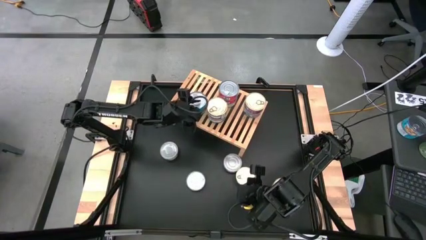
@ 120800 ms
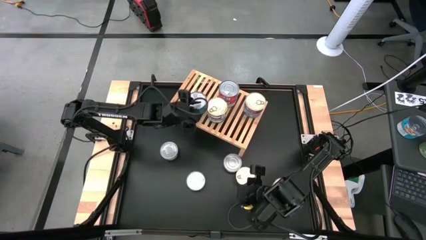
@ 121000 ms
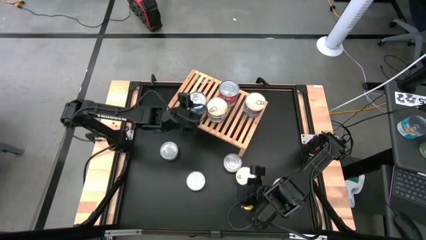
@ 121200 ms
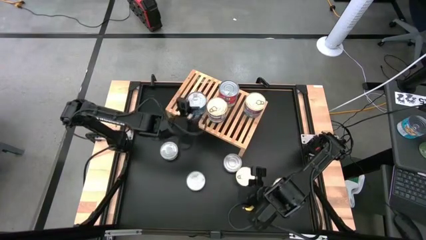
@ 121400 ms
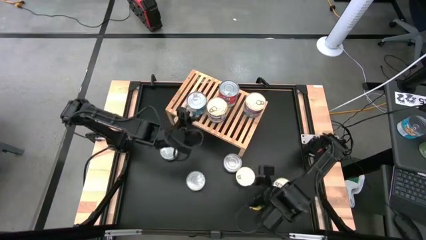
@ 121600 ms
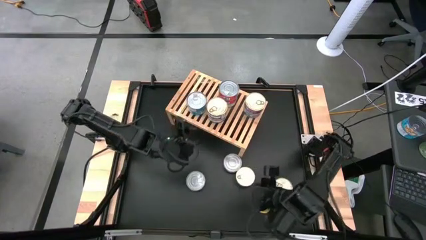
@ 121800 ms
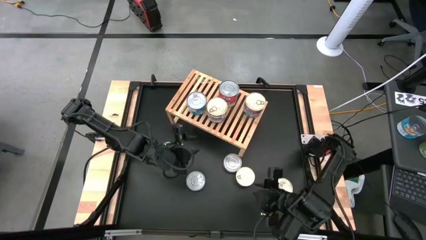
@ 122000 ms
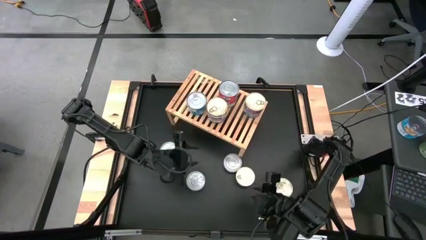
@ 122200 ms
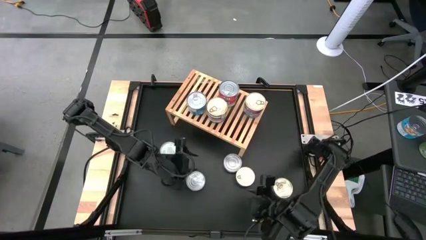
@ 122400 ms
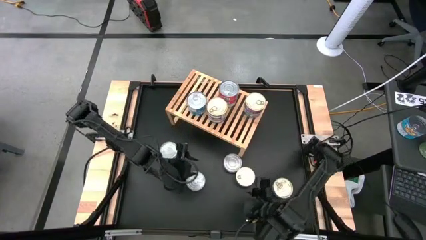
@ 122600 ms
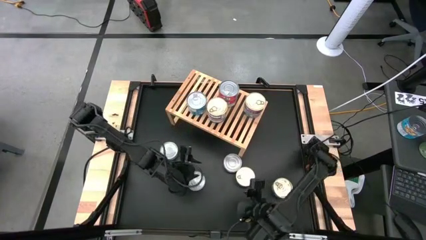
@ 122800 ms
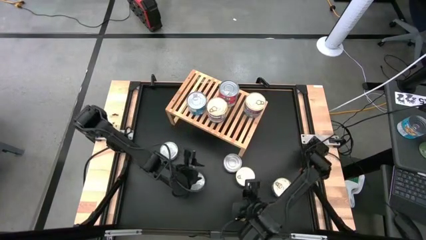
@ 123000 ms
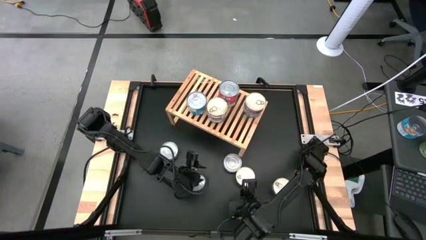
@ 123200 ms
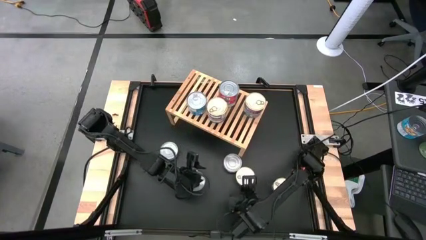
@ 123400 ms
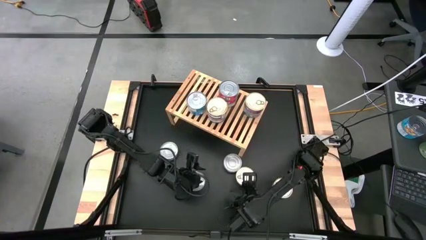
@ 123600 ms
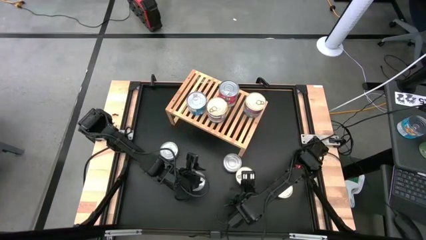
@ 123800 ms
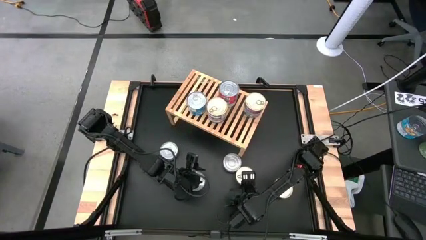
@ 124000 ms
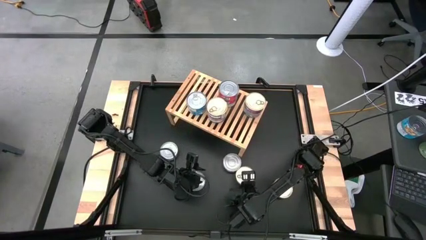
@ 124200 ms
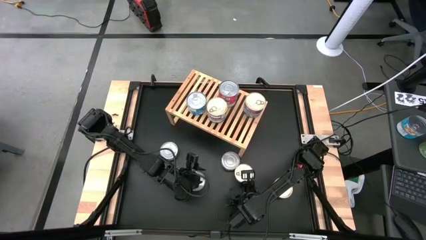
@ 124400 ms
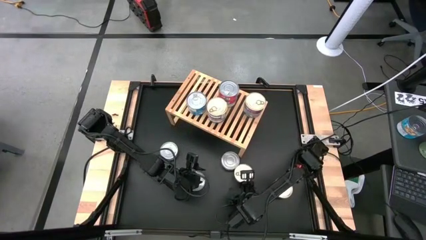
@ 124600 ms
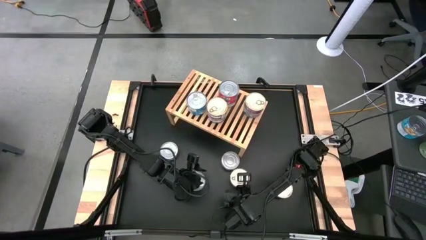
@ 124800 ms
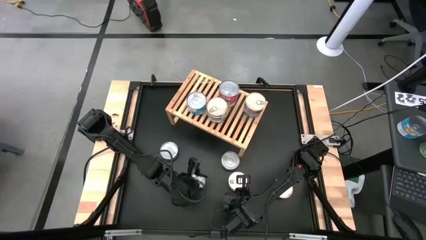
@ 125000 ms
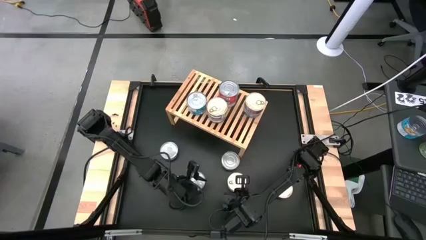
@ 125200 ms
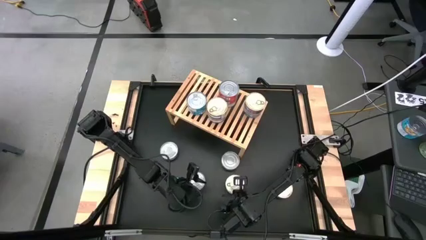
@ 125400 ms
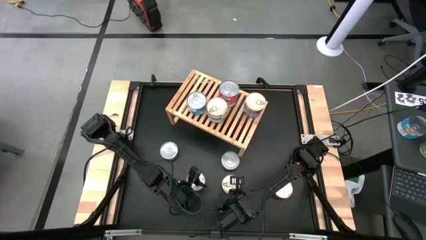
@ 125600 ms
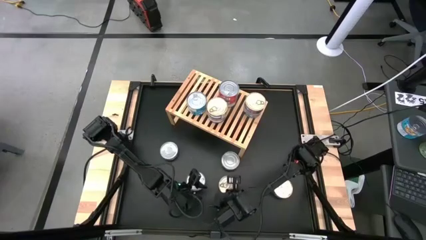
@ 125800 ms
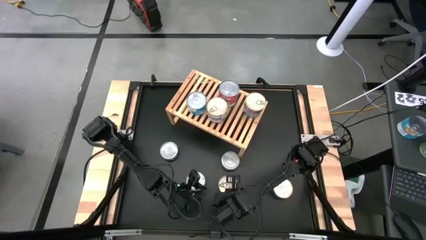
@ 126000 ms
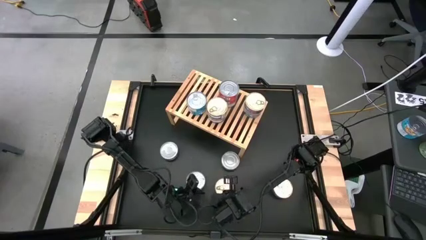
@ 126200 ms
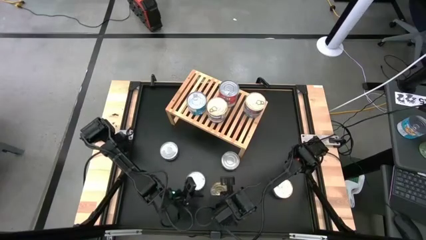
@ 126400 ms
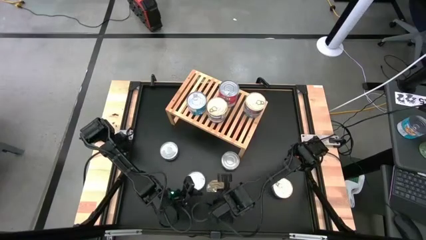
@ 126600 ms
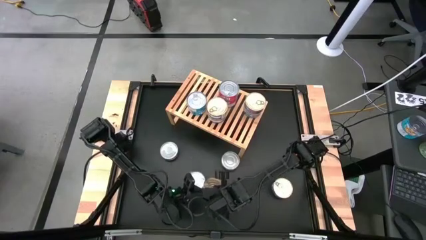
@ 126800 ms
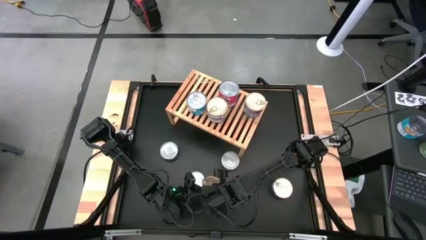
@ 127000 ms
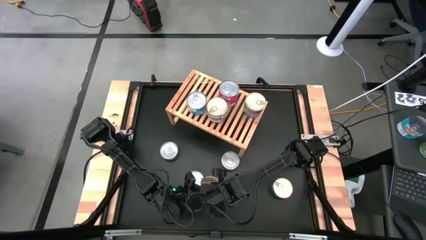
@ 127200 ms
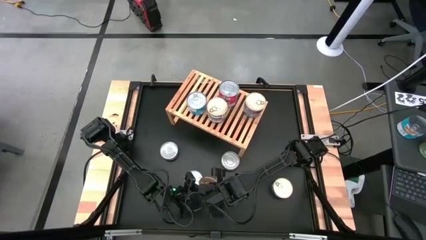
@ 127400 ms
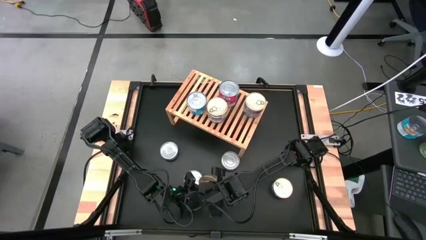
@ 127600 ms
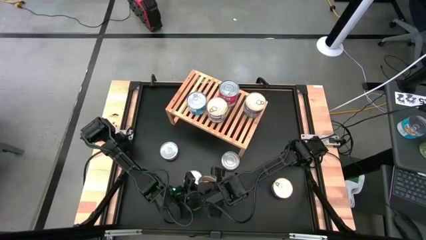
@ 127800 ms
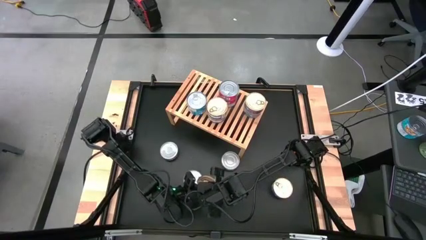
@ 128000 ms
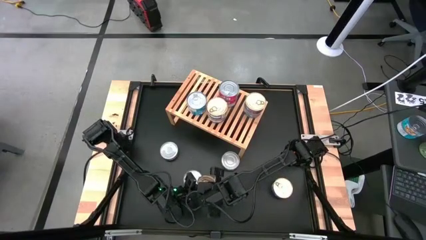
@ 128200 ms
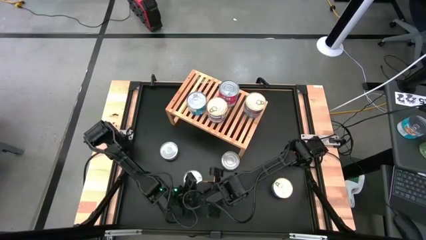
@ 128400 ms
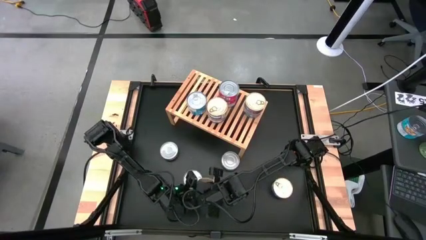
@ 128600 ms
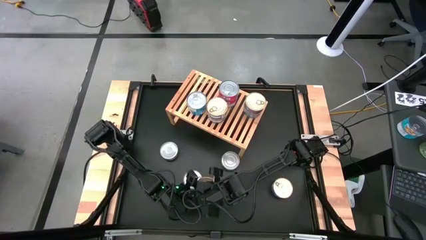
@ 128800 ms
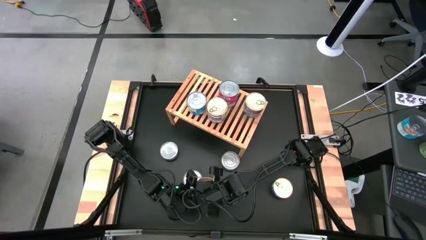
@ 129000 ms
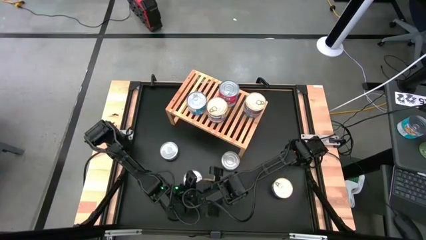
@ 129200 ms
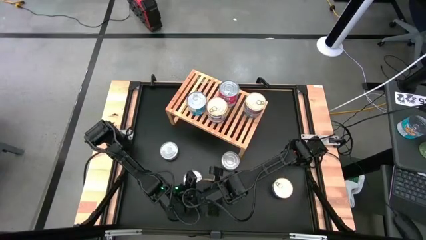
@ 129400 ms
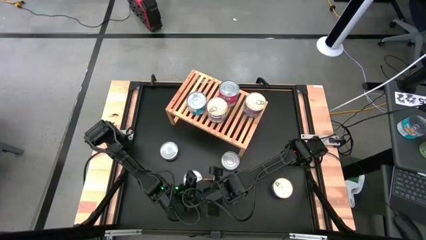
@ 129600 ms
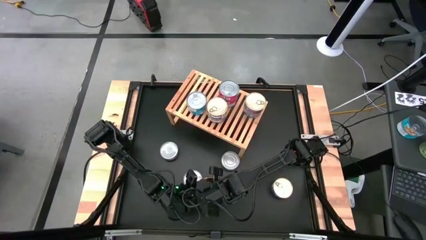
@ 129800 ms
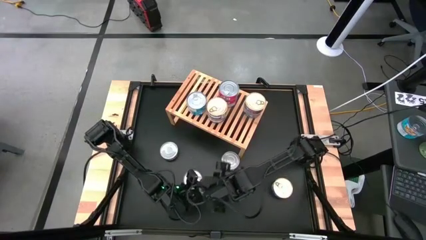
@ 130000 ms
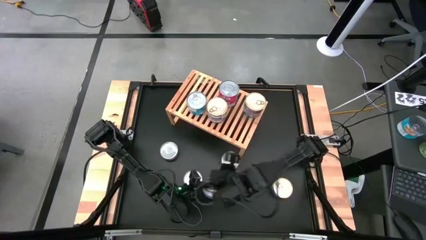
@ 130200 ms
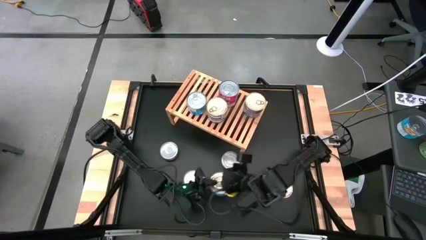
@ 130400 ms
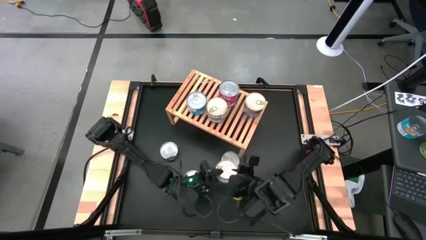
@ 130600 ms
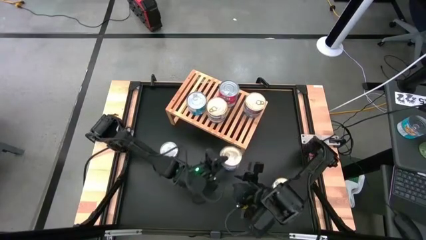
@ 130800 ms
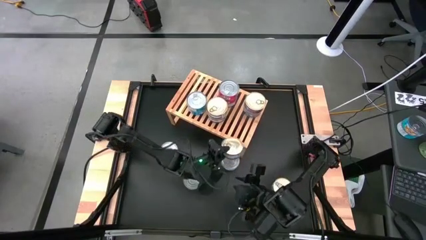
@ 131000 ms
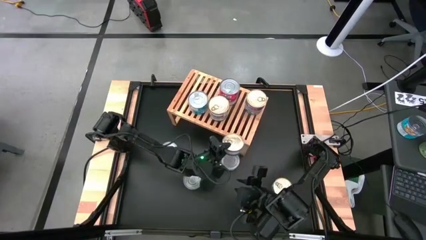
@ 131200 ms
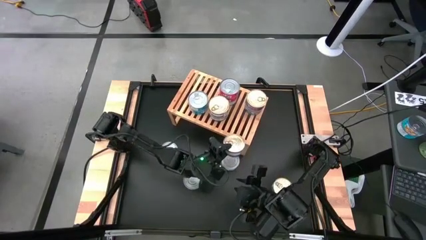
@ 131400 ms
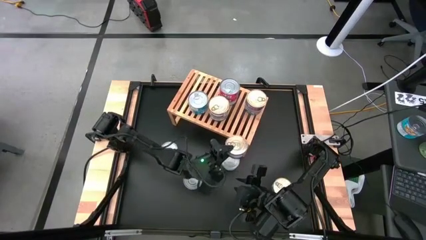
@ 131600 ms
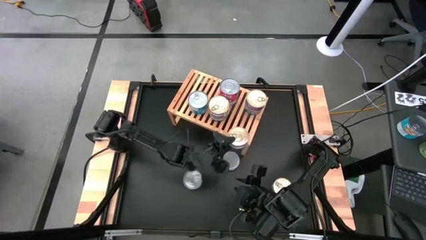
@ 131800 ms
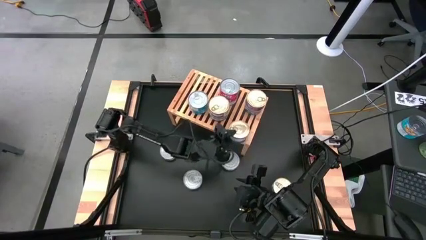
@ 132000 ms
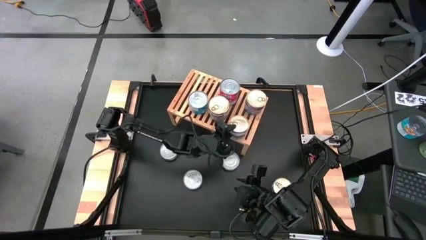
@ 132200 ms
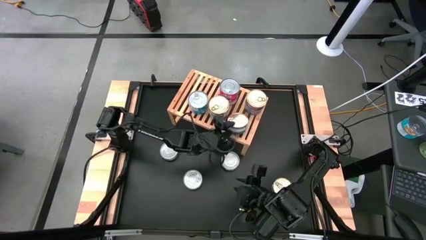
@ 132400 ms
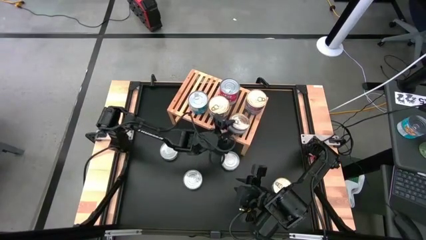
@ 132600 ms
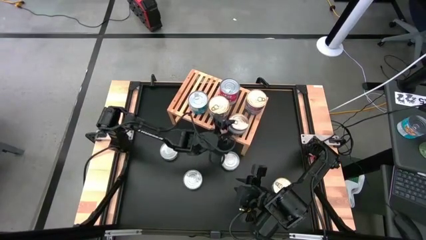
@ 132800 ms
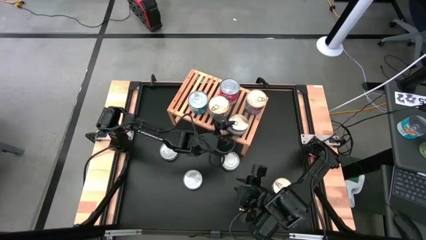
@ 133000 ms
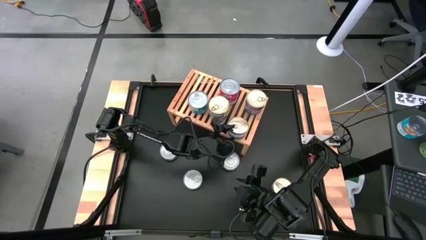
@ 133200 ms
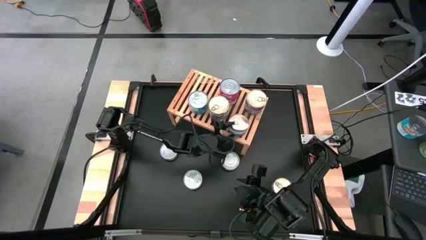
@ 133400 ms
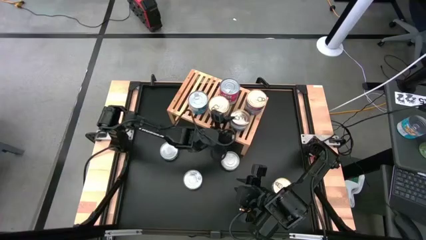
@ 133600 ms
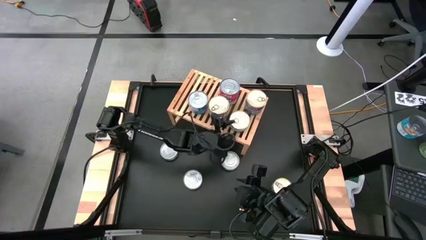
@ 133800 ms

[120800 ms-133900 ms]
Task: Stack canned seafood by type on shelf
Put the blue and pink tuna can aligned white the other blue and pink tuna can on the shelf

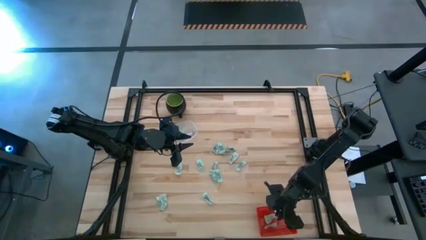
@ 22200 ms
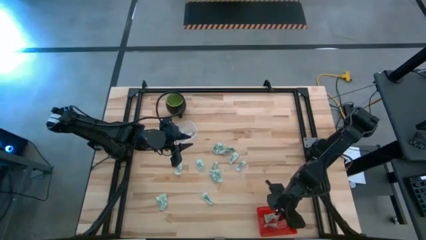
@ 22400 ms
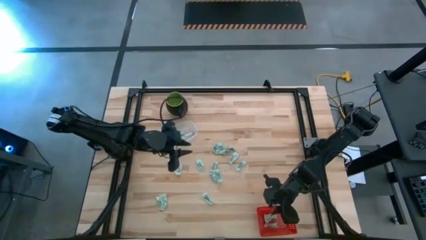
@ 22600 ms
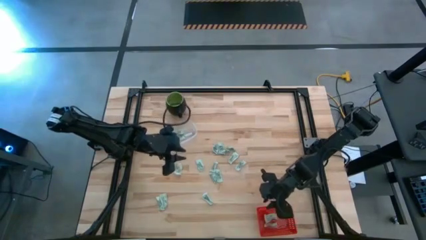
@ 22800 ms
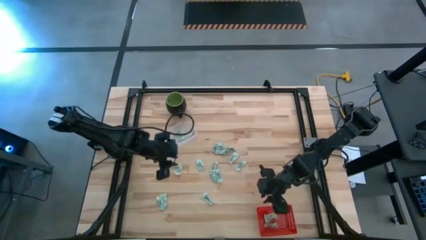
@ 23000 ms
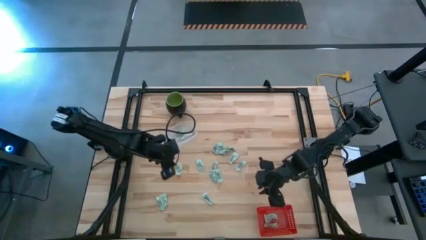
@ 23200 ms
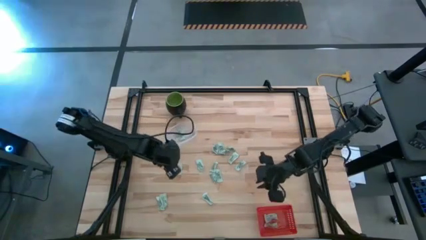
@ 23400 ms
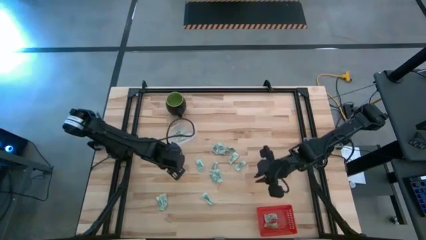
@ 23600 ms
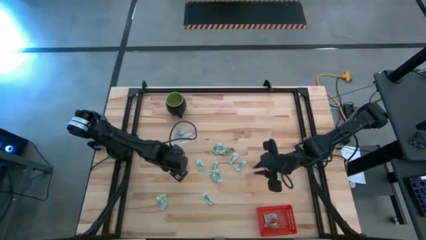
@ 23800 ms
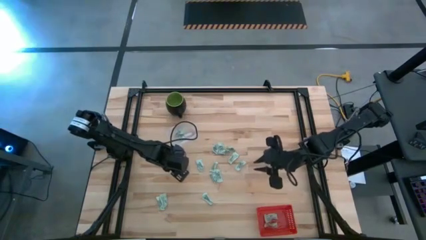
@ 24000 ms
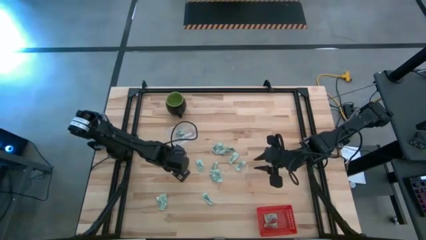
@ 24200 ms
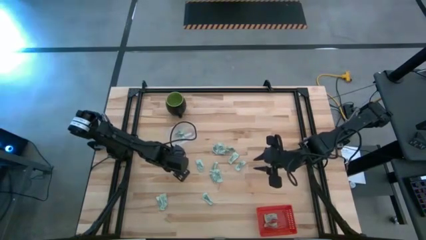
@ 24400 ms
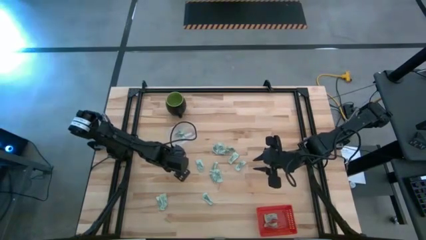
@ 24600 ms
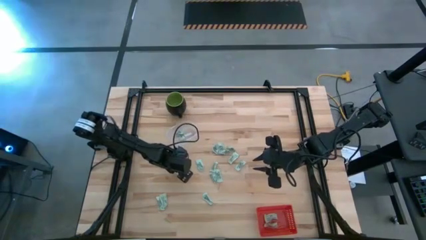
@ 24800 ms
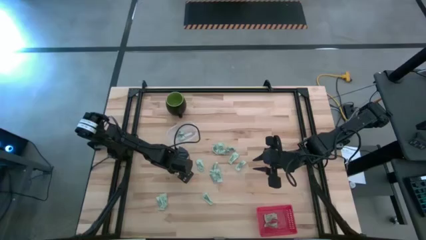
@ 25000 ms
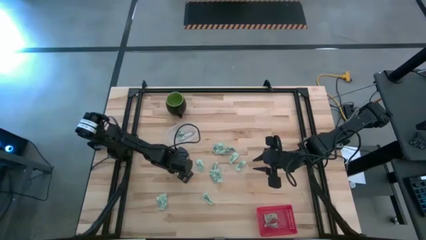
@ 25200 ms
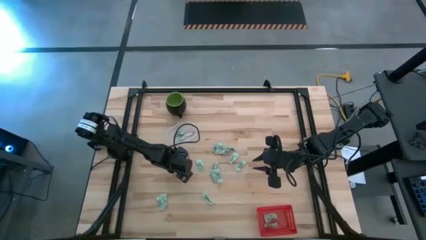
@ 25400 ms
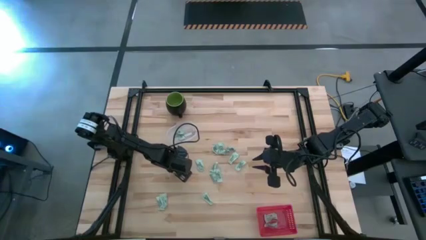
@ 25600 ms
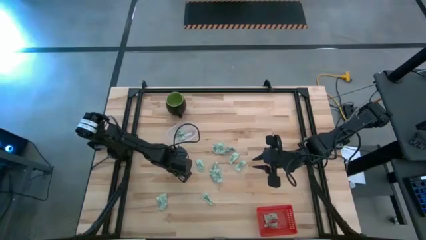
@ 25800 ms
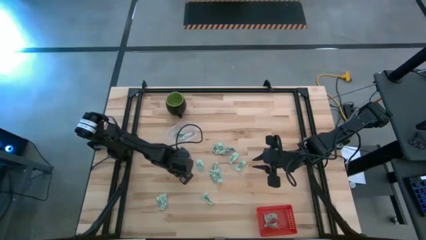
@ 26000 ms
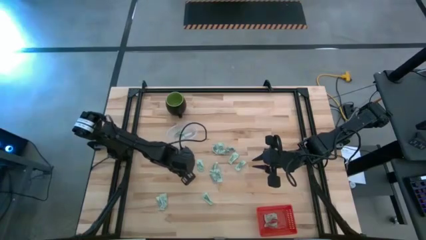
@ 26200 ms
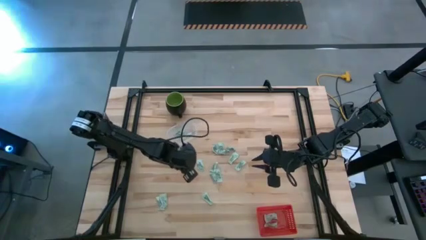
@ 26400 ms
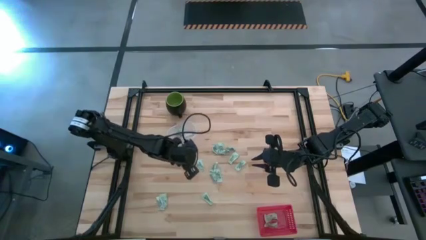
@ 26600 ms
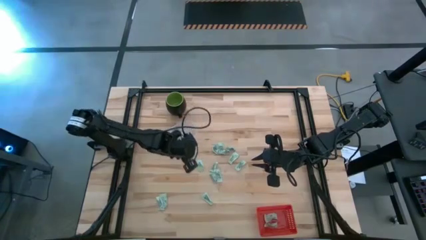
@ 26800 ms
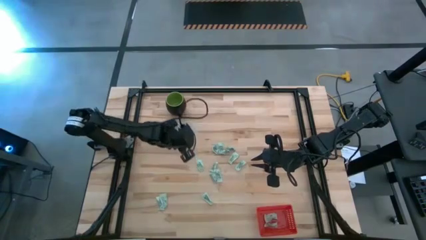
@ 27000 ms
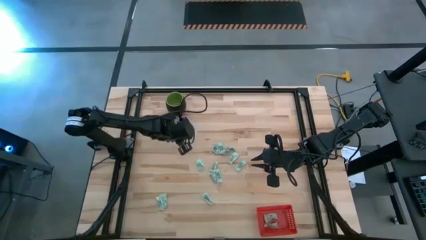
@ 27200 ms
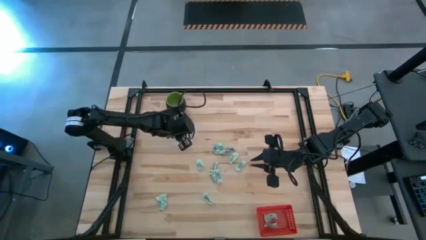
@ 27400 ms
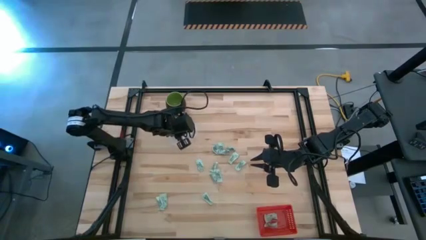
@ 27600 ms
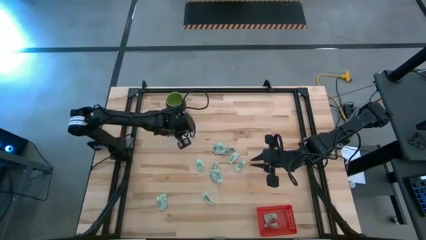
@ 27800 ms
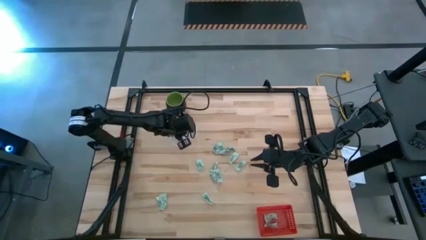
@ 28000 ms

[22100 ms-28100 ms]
Task: Pick and place items into bin
Put the green stevia packet into the transparent bin
